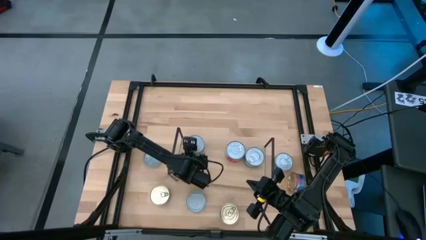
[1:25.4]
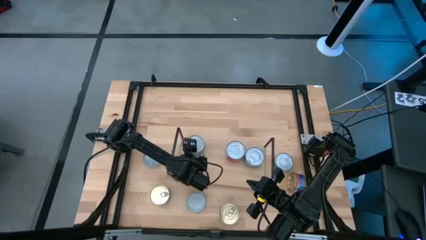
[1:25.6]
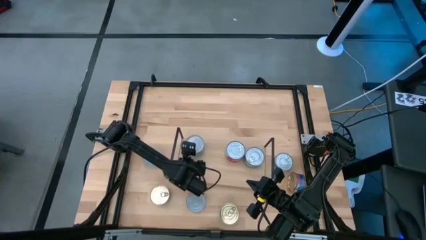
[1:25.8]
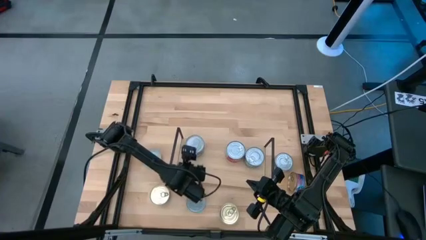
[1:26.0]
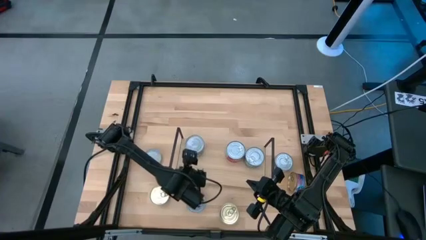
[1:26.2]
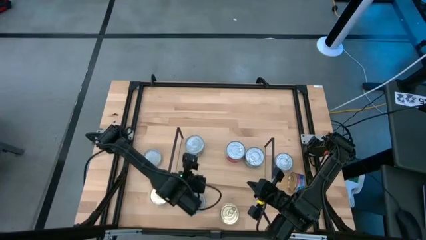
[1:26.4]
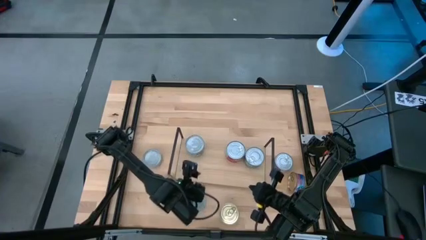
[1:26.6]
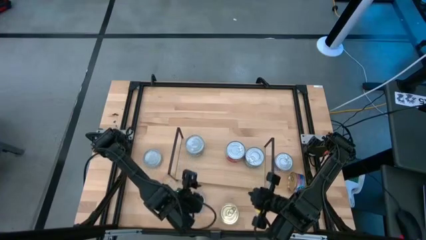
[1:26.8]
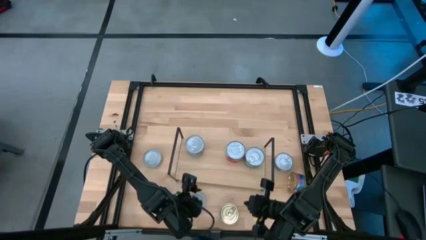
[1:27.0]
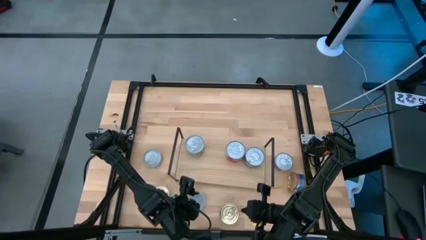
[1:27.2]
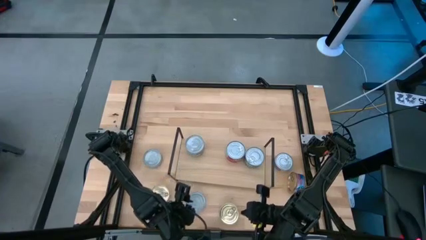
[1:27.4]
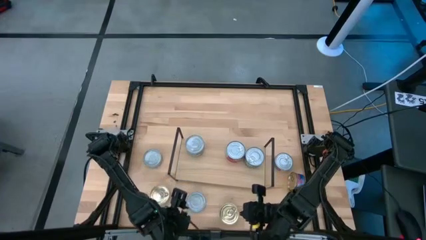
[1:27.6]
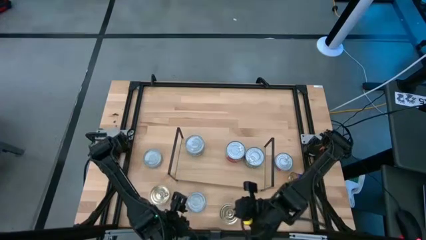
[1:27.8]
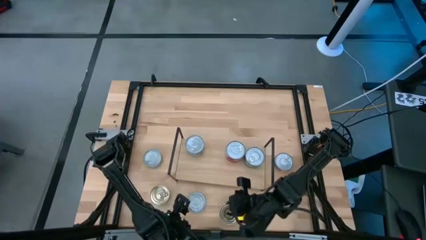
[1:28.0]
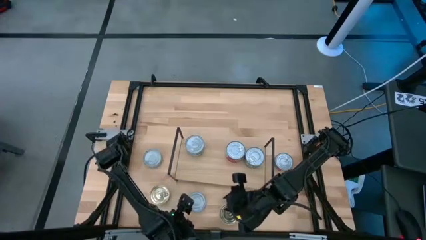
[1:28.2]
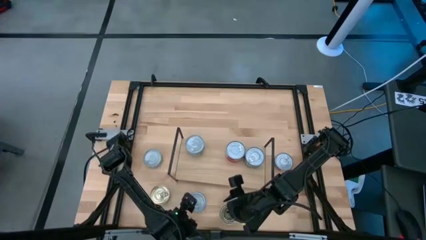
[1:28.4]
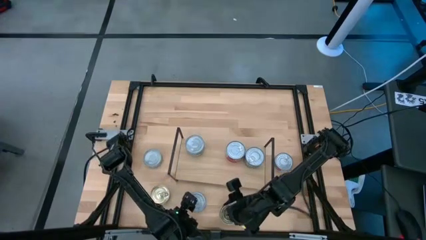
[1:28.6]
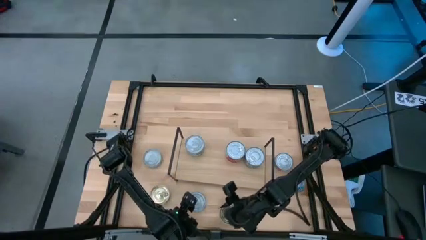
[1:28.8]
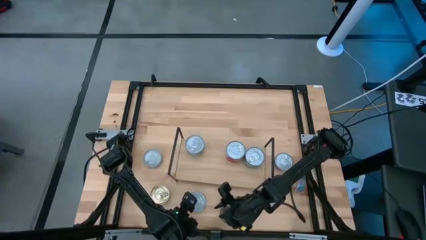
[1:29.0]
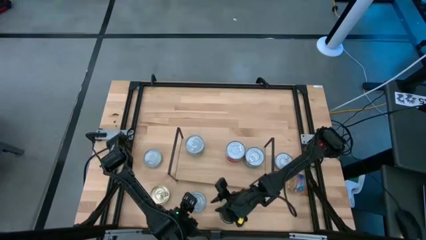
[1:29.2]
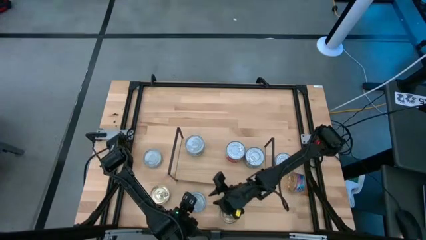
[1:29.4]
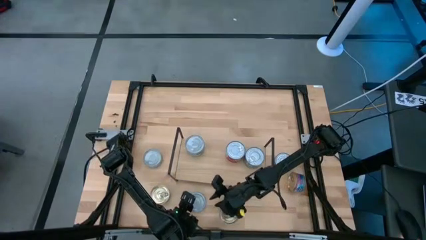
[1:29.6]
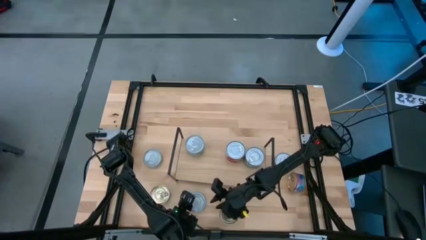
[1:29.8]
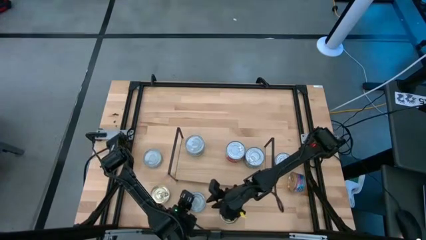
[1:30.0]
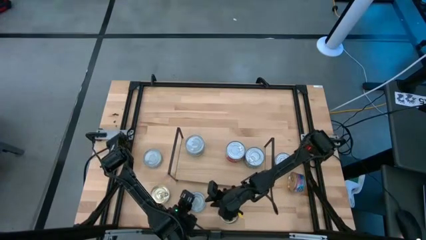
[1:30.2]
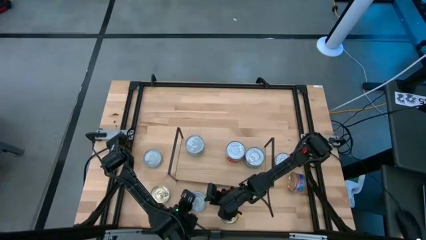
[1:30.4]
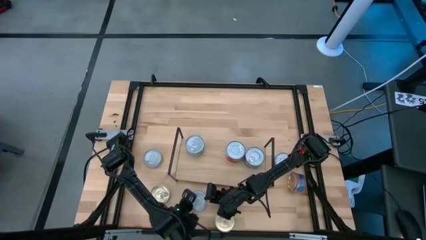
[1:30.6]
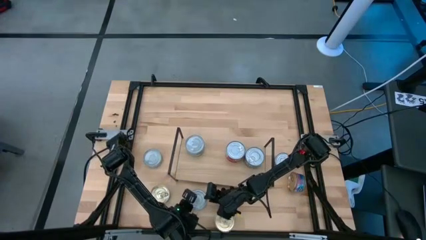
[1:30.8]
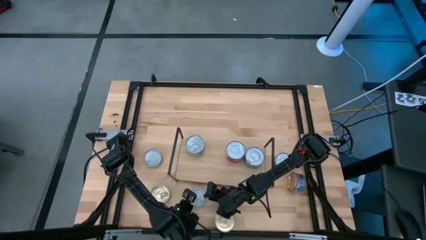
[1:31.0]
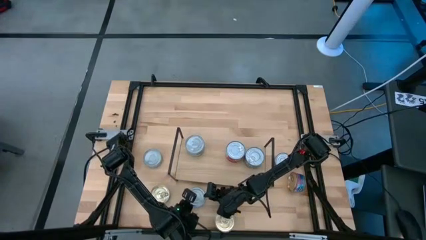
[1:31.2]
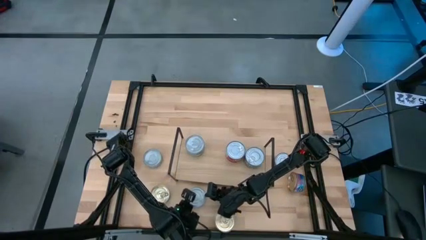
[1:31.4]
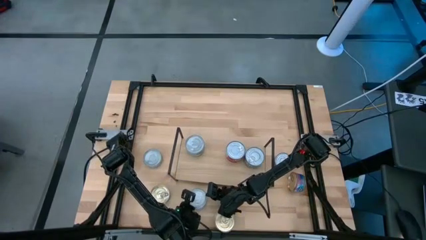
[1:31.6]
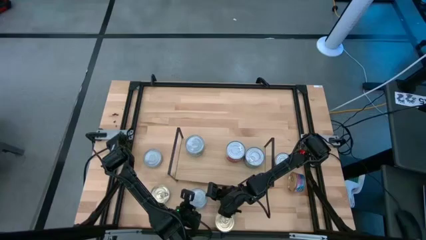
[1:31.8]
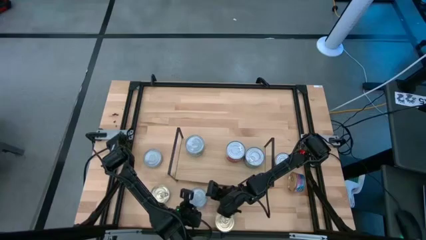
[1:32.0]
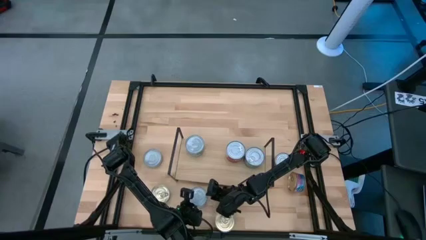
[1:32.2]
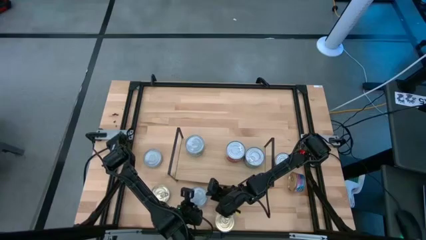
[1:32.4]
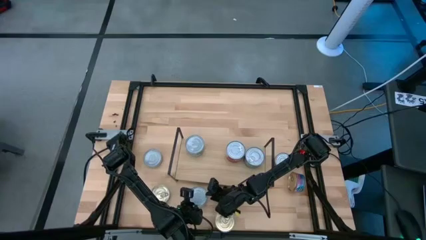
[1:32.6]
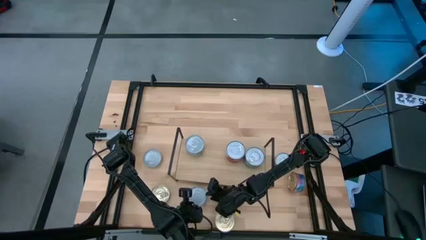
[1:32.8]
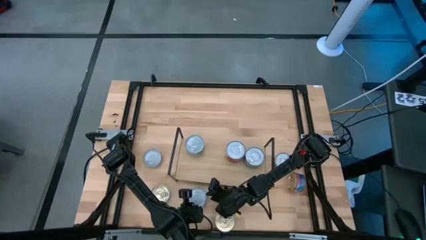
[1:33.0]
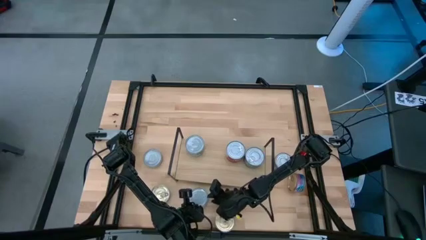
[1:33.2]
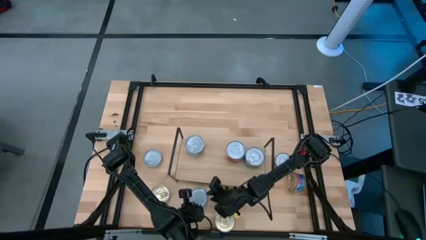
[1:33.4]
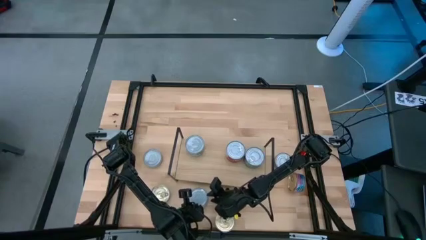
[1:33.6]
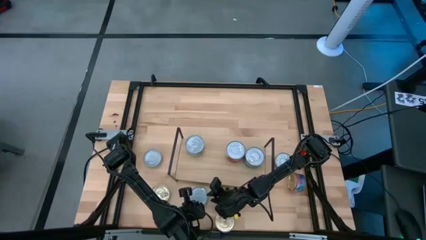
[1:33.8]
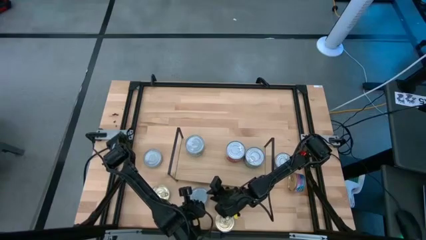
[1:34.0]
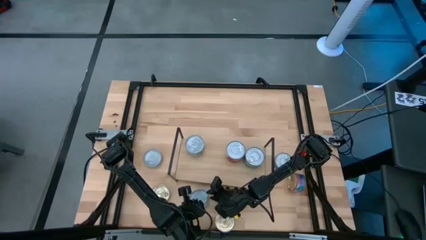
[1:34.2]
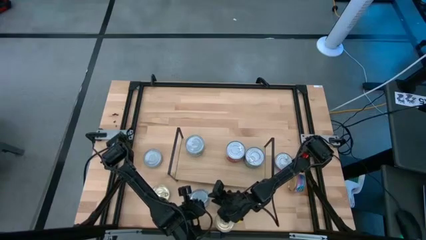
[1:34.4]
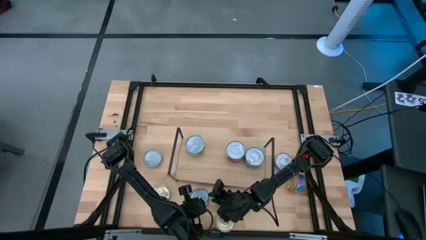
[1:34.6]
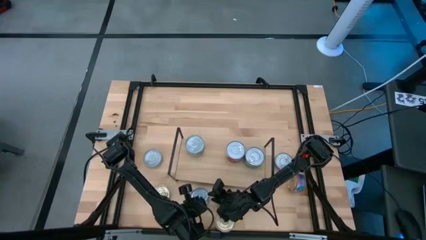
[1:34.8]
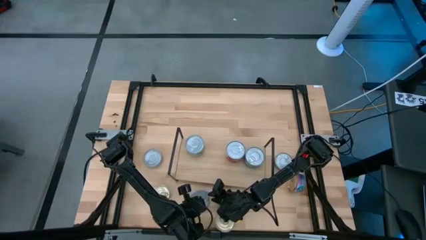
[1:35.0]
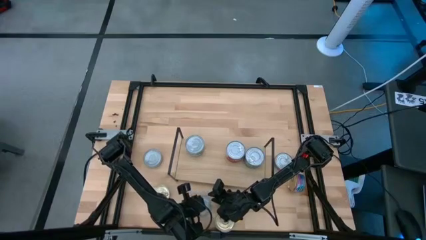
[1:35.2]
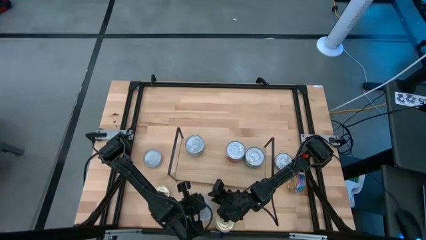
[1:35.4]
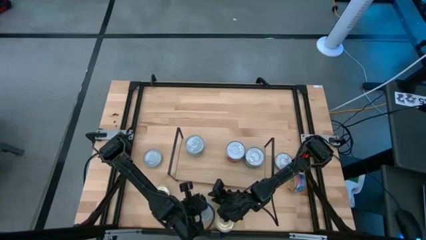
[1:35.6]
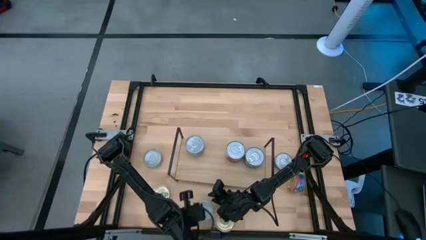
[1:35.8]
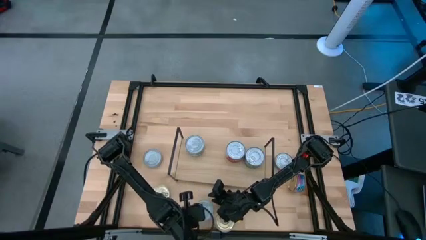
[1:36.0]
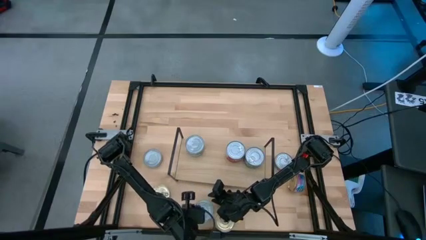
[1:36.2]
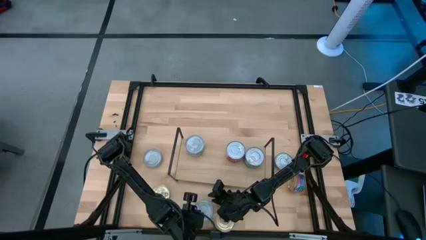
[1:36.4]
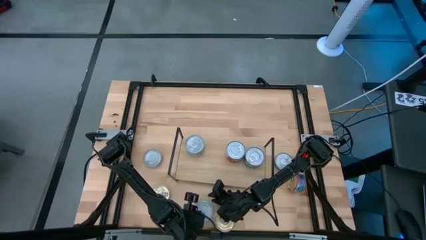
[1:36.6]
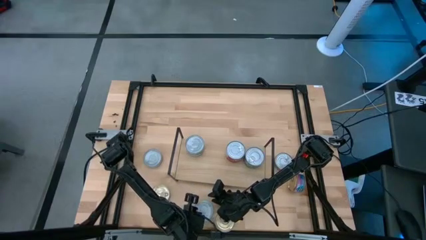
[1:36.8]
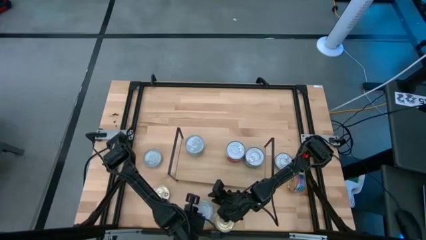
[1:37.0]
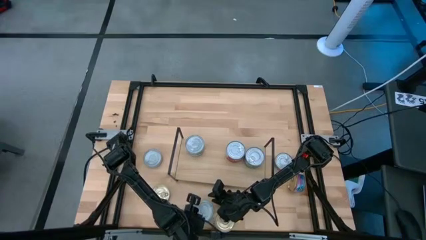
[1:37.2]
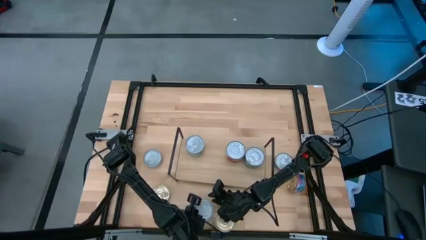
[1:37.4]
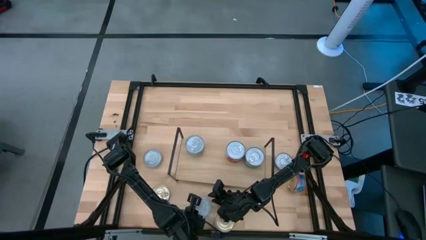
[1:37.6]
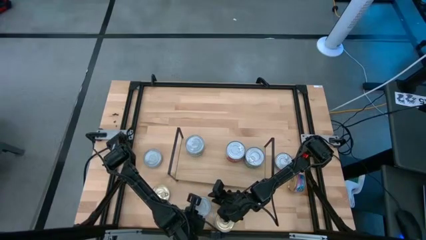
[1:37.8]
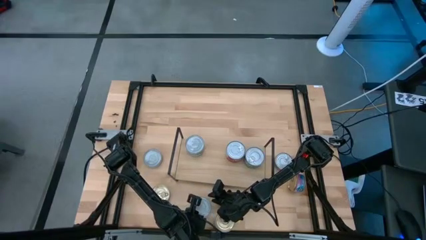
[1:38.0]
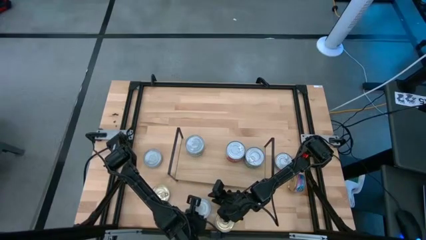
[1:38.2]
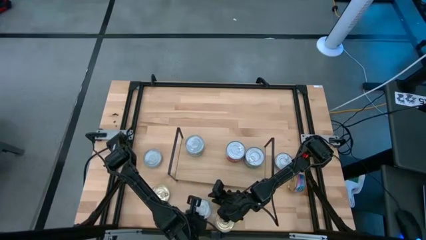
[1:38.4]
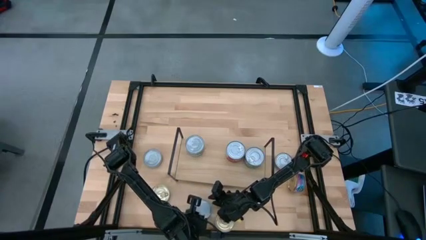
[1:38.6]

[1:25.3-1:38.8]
Task: Stack canned seafood by type on shelf
Stack the green white tuna can on top of the green white tuna cans on the shelf

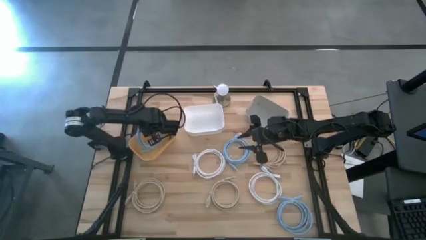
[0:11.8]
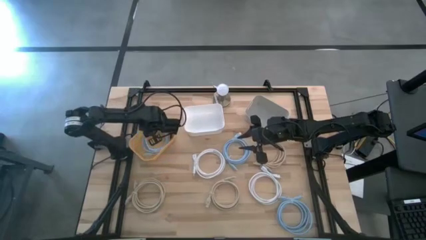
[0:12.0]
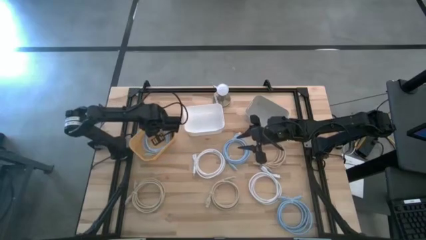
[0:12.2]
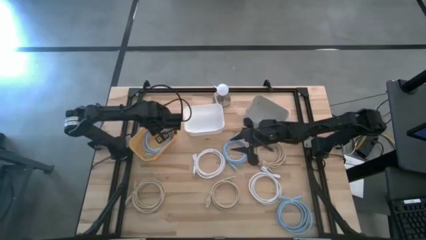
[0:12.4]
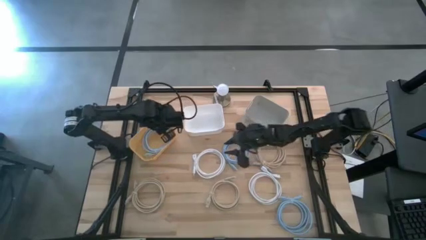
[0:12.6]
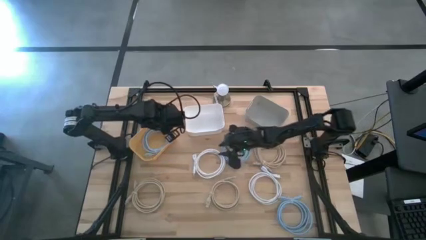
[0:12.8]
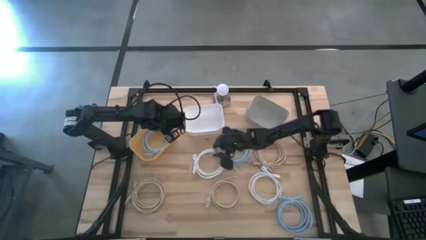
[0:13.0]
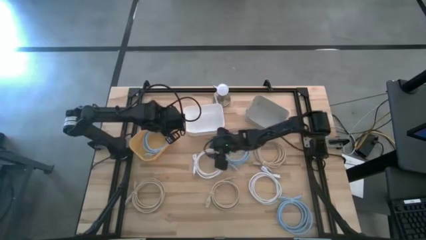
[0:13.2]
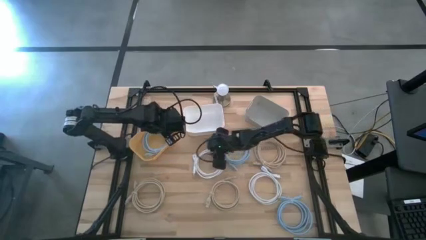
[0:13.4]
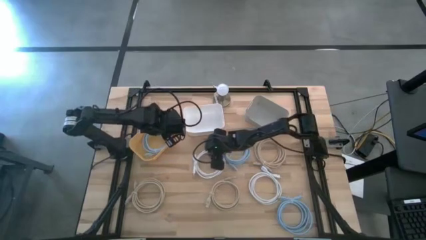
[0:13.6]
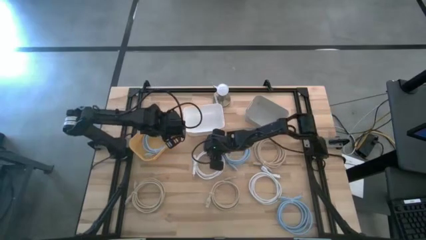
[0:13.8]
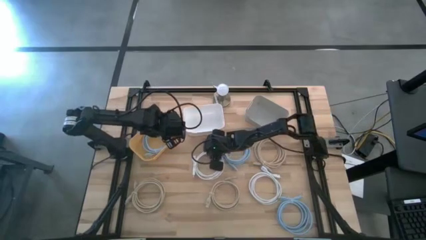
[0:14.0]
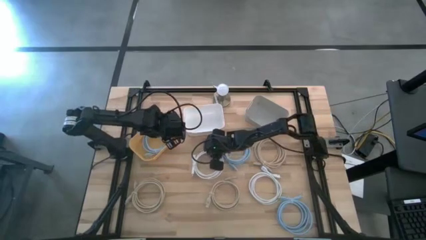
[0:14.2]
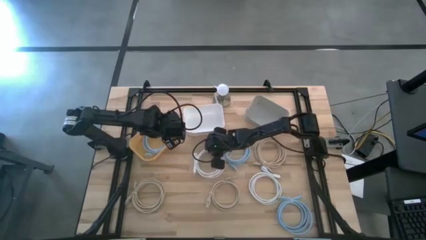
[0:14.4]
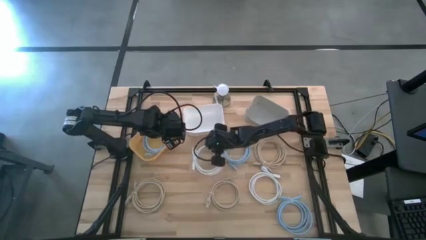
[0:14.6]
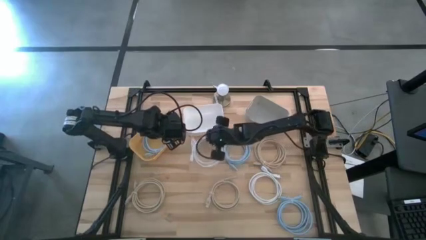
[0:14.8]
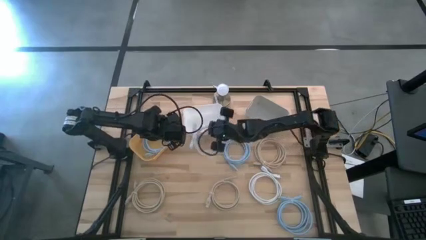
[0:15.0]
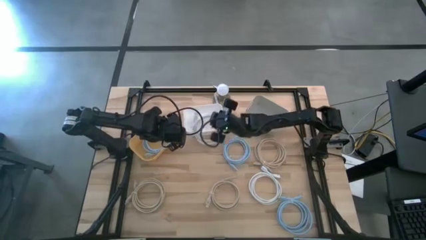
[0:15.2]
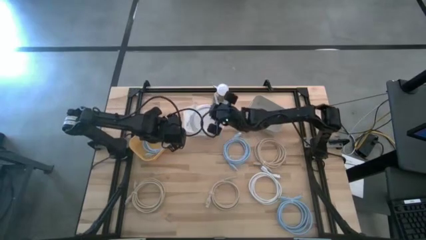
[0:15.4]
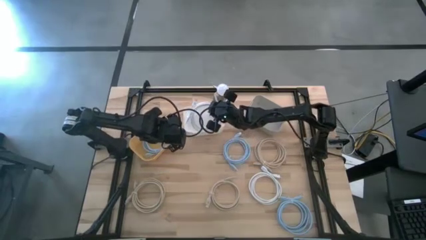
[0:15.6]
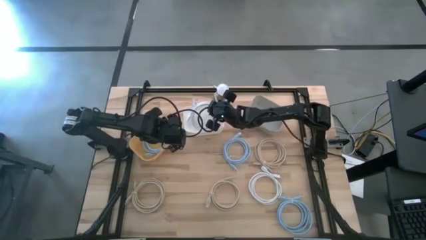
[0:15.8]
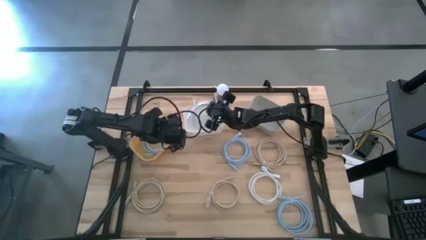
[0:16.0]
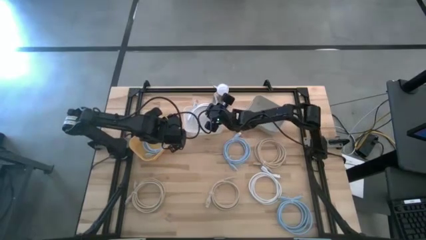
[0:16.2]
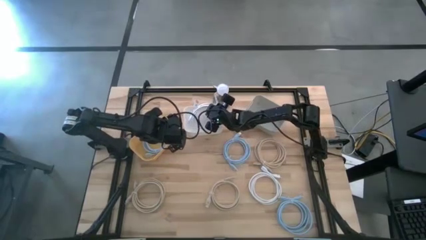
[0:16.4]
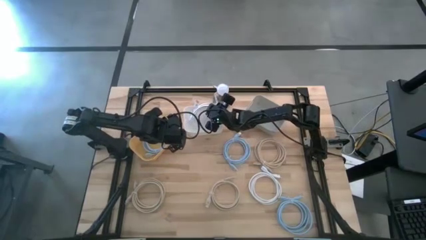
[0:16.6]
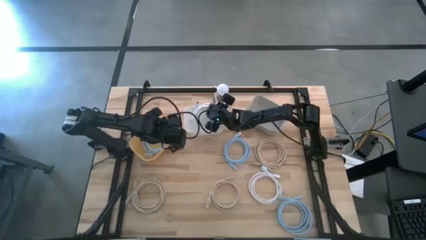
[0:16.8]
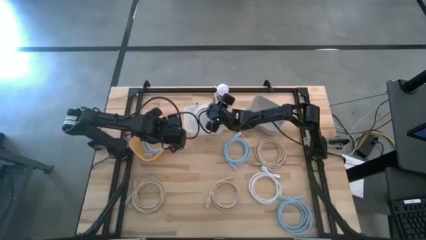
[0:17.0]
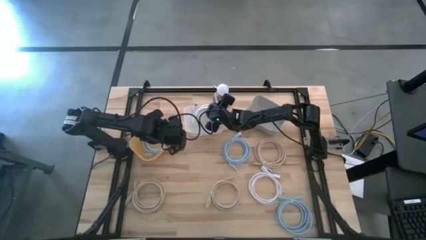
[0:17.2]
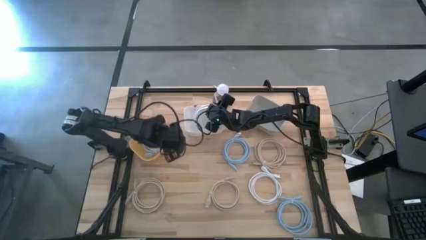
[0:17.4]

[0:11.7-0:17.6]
Task: Sort HDMI cables
Put the top white hdmi cable into the white bin
